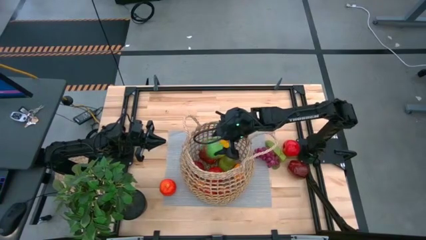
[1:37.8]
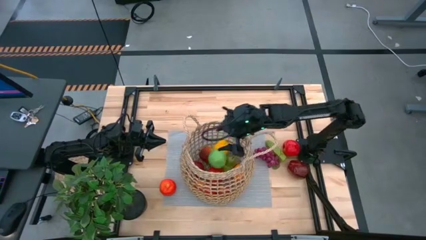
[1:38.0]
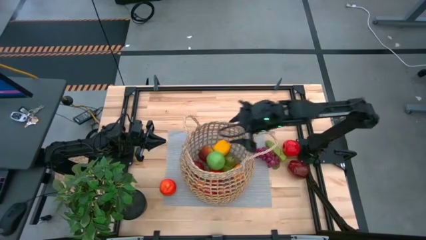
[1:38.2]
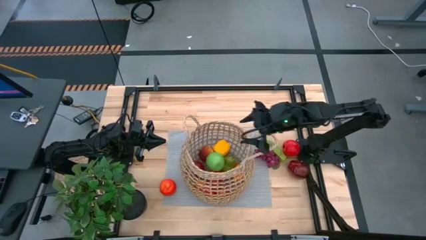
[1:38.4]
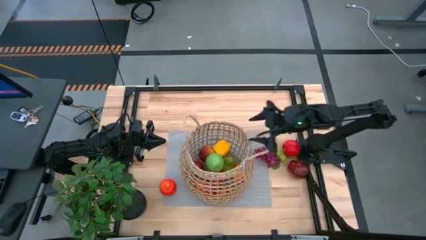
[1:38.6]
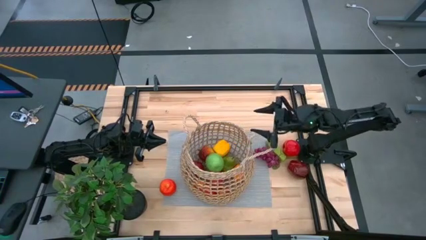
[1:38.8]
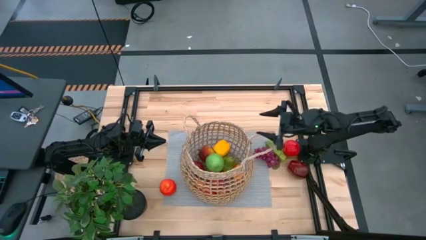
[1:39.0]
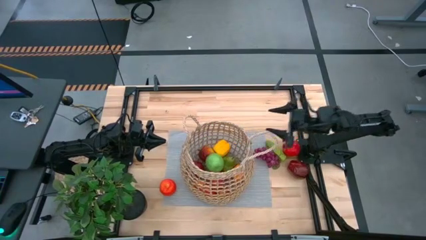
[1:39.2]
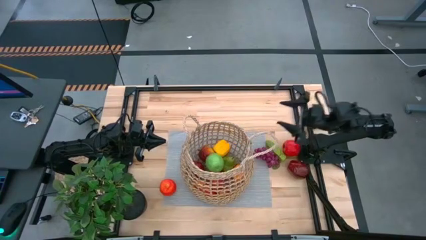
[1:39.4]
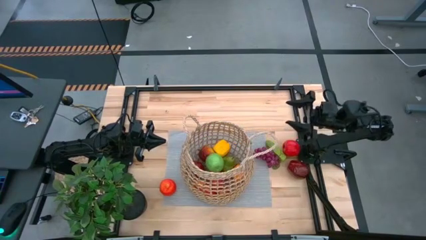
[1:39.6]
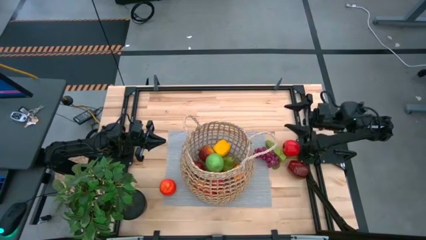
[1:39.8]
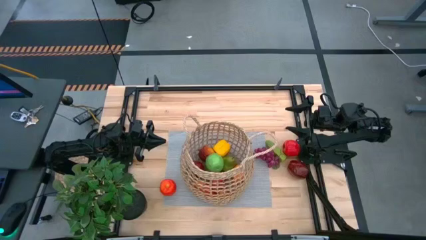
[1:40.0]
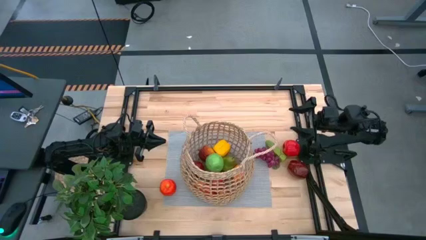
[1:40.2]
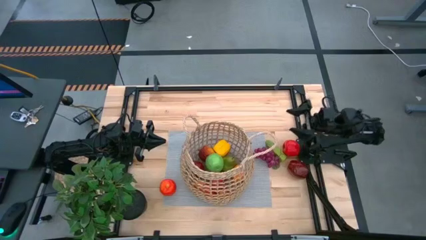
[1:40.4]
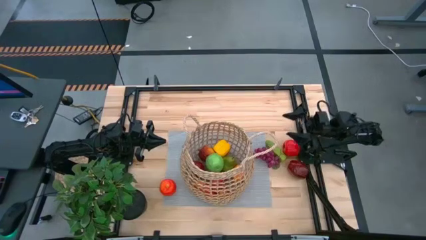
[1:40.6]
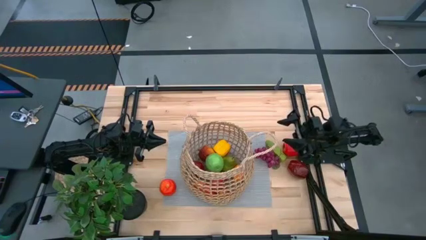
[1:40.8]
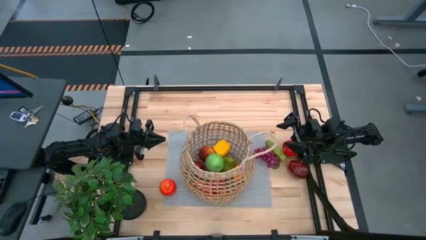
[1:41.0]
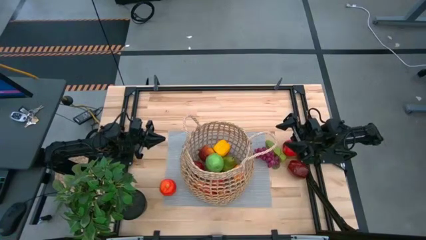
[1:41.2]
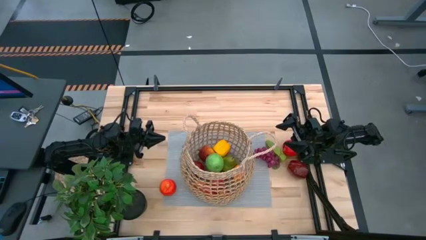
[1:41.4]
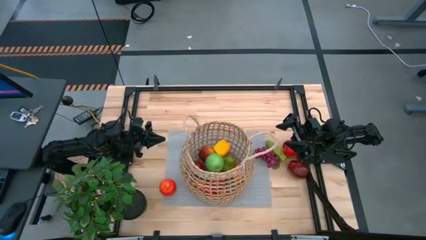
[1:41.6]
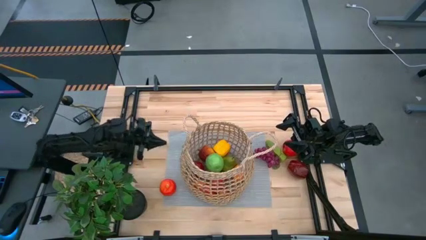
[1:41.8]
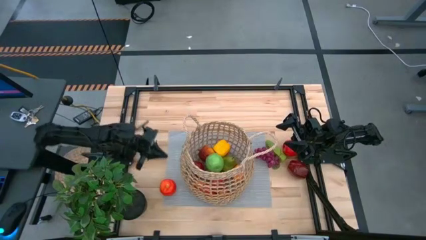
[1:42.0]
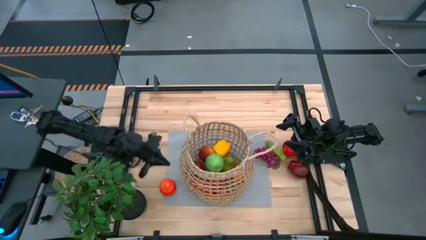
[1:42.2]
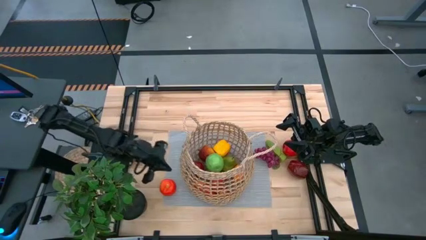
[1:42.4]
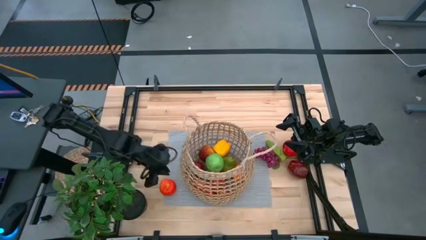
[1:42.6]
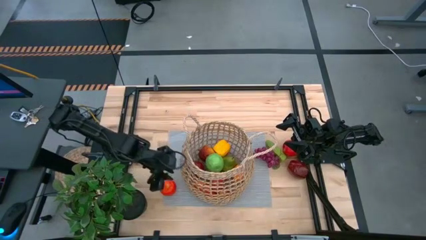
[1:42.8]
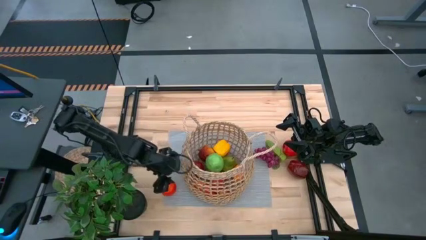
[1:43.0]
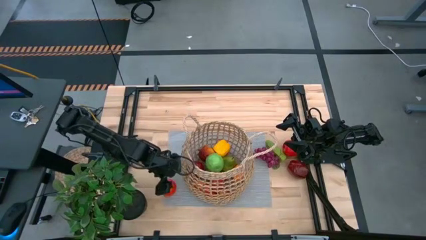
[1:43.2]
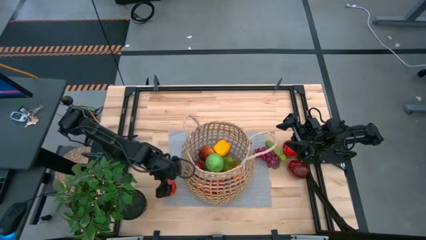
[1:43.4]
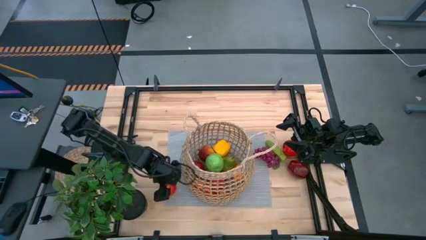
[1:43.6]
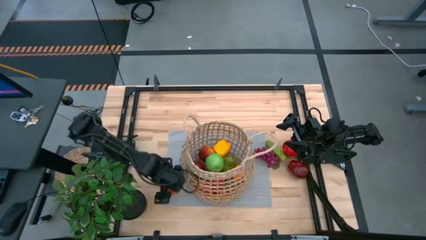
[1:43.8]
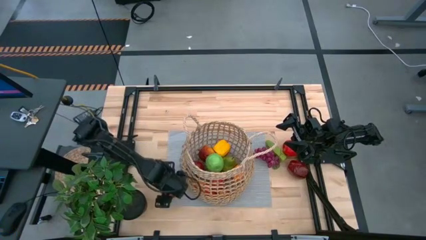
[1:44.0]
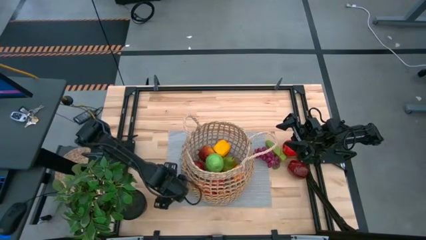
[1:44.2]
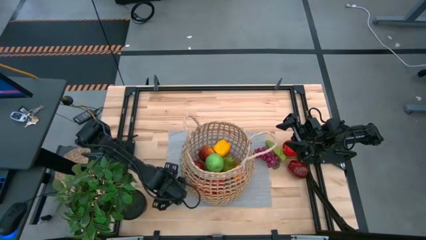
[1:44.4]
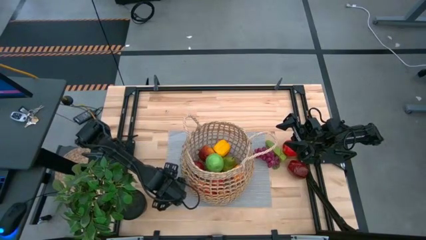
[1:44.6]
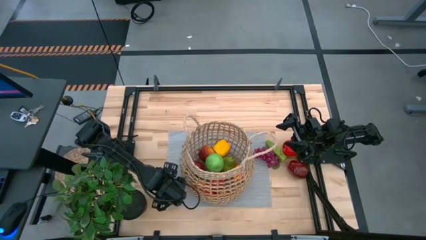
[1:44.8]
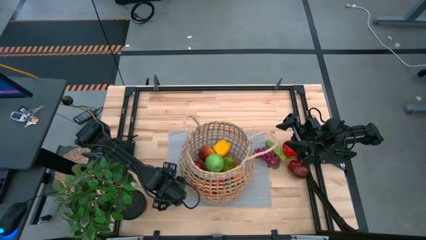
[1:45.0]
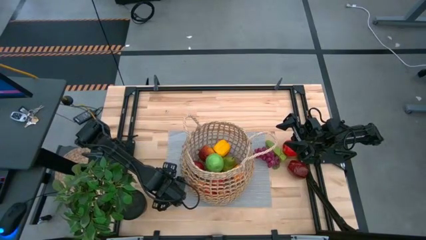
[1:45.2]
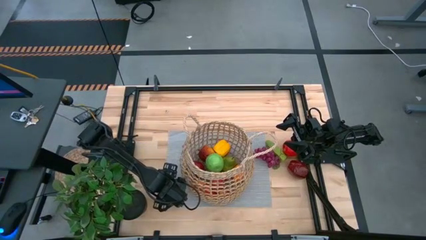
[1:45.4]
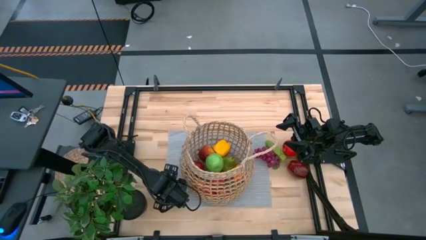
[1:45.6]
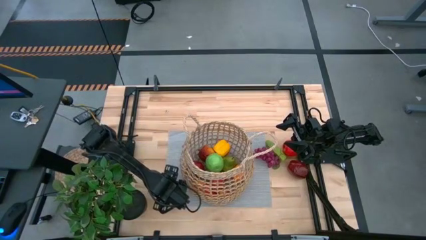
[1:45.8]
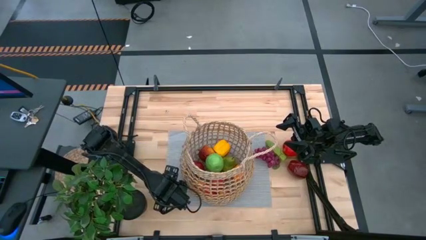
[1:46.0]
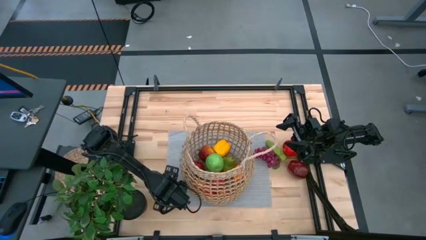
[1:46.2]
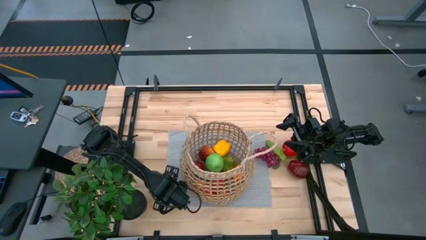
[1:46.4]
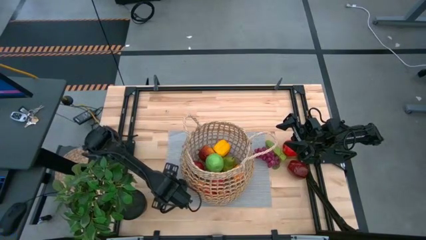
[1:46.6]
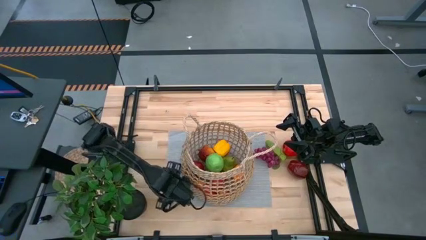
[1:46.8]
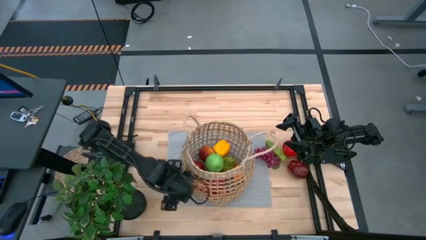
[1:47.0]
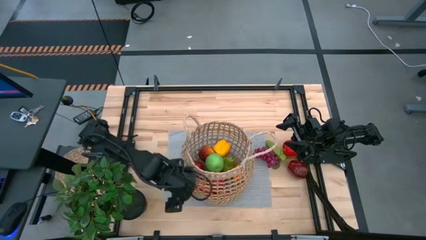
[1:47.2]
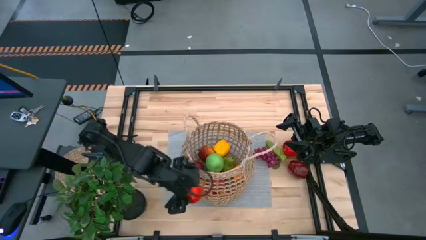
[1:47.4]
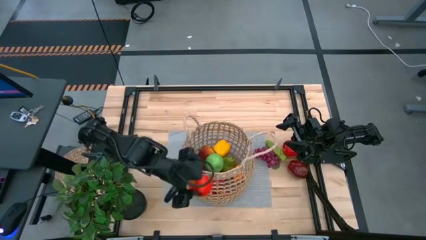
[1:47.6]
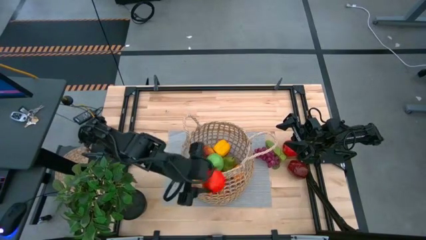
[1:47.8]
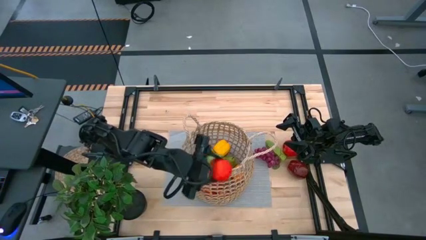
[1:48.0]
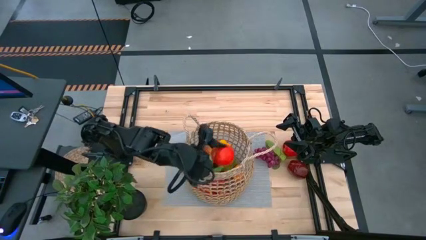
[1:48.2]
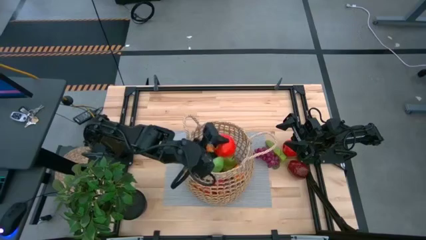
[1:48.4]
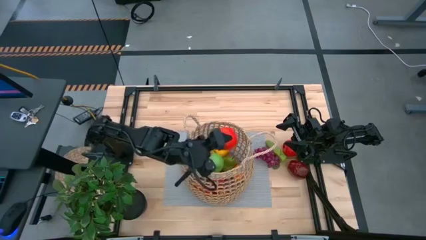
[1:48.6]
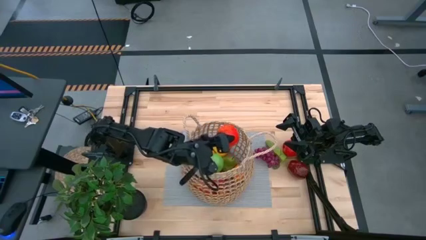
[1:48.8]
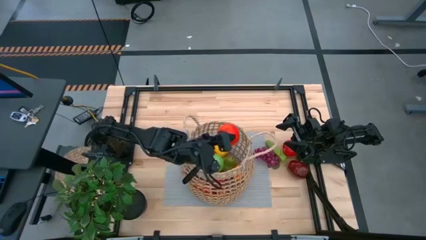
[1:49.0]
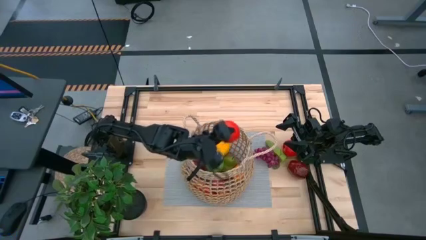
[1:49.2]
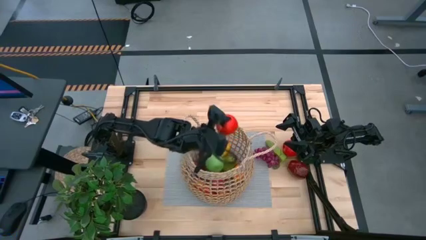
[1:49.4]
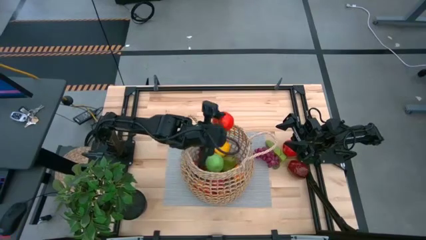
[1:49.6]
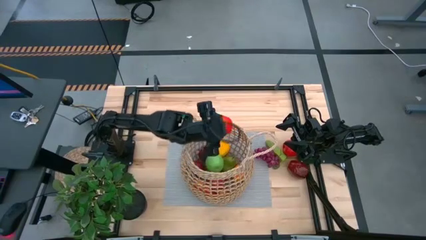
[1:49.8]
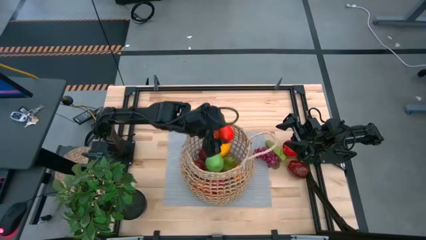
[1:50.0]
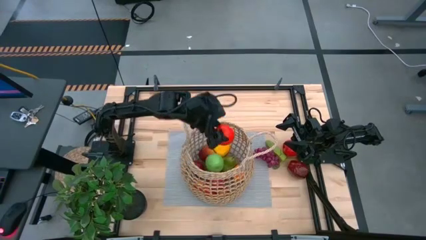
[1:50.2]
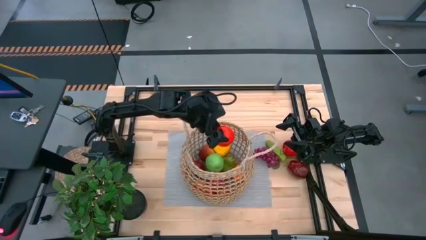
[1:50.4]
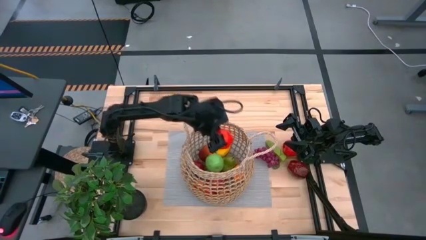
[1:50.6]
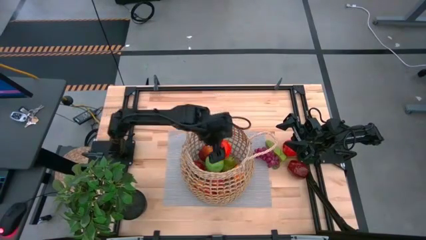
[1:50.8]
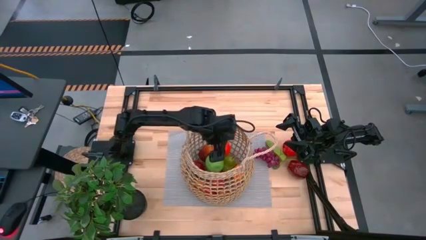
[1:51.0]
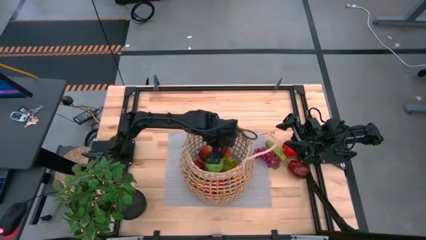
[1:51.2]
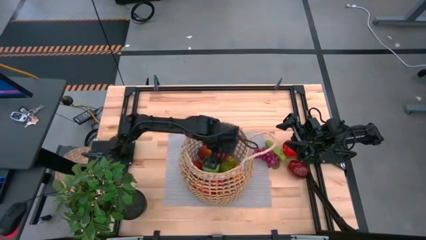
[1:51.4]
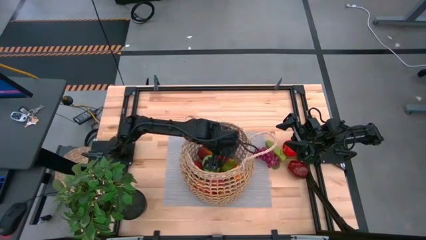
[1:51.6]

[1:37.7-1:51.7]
Task: Build produce basket
Put the red apple into the brown basket

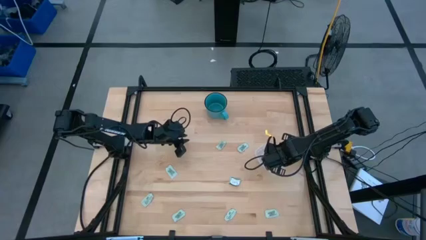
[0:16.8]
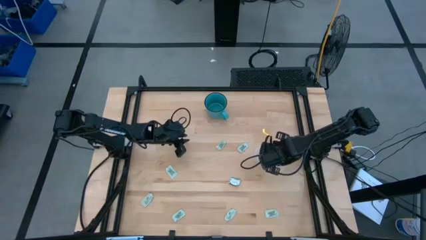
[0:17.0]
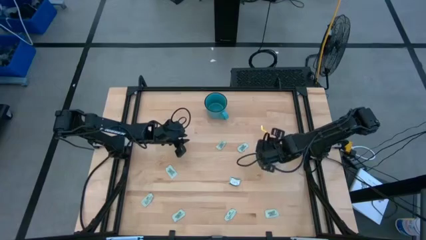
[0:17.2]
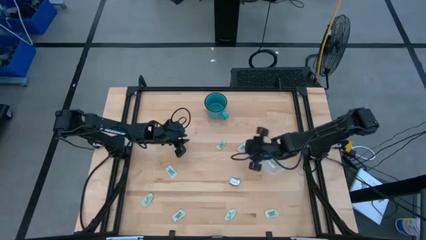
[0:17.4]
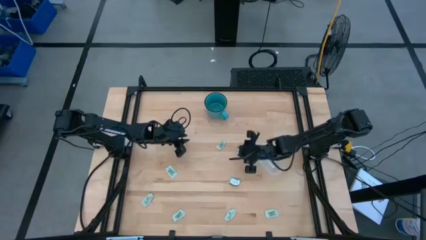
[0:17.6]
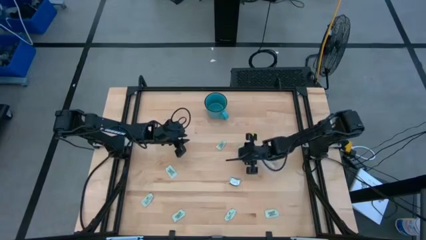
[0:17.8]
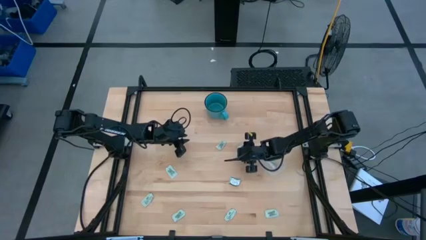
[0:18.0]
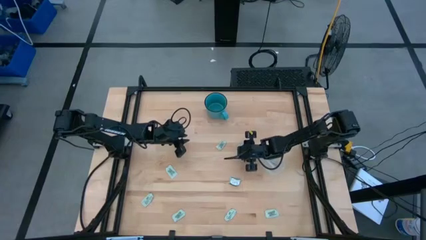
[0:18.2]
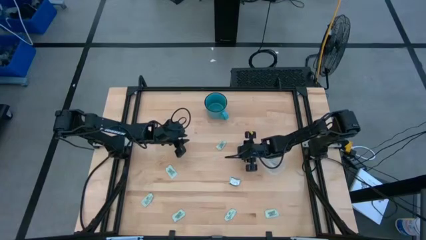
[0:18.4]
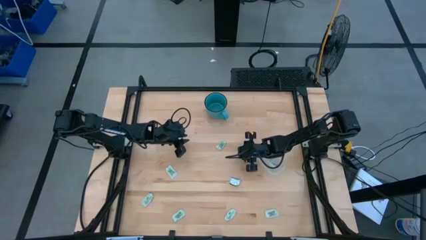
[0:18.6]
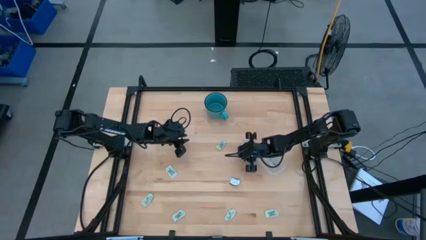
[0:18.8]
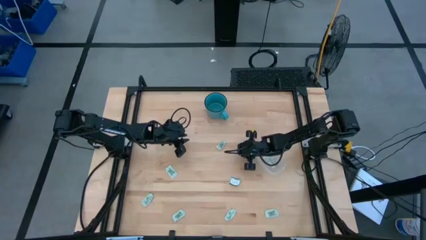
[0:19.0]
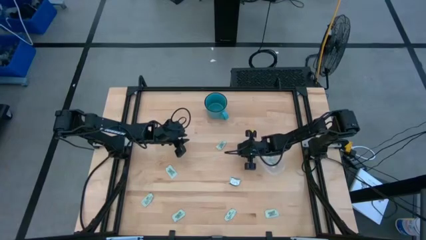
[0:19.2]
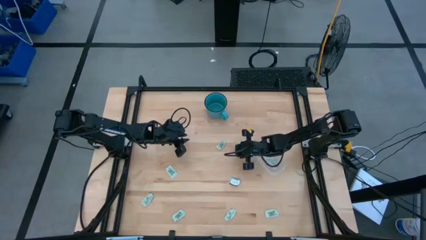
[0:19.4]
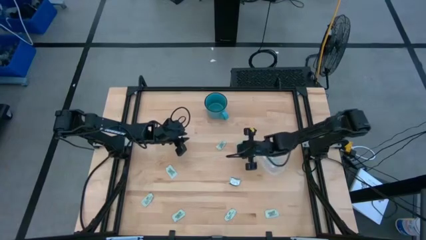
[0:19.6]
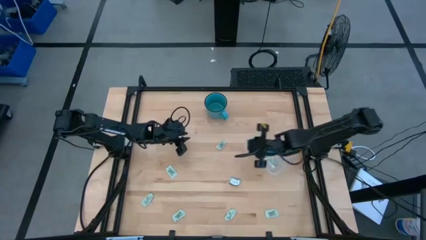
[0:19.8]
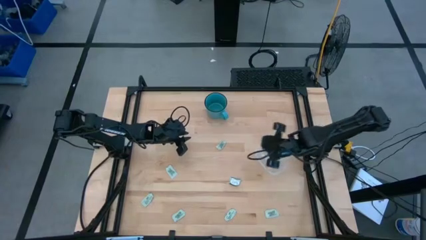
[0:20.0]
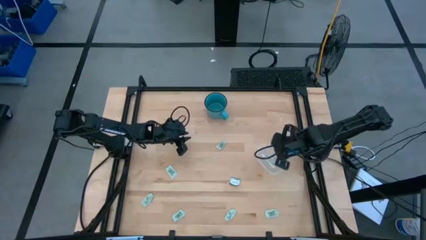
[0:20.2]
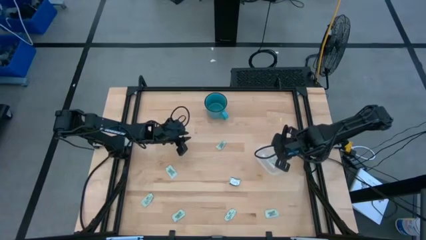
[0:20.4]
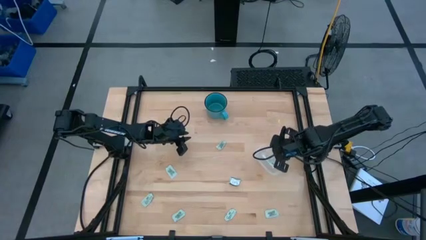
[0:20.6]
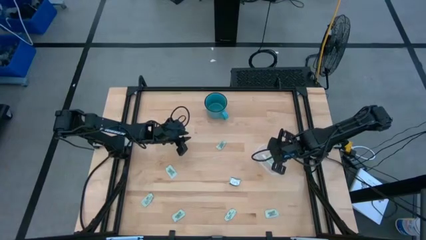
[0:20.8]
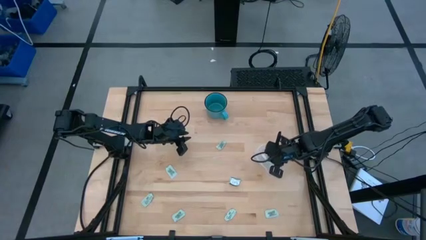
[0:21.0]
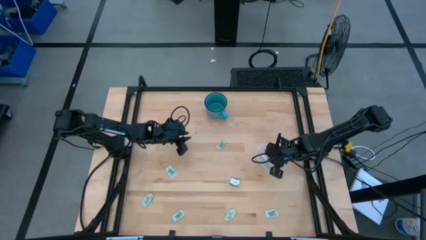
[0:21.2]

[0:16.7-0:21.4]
Task: Pick and place Stevia / Truvia into bins
Put the white stevia packet into the transparent container
